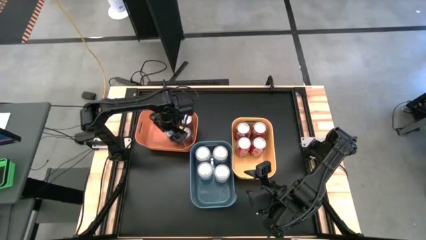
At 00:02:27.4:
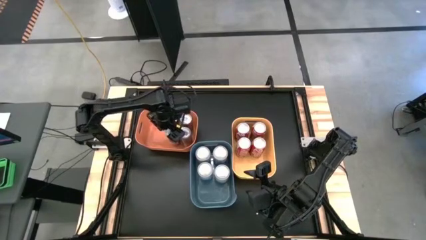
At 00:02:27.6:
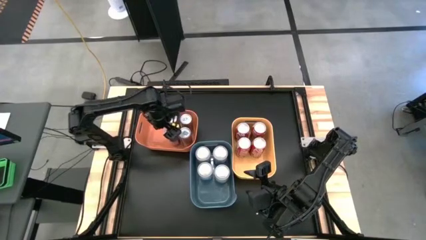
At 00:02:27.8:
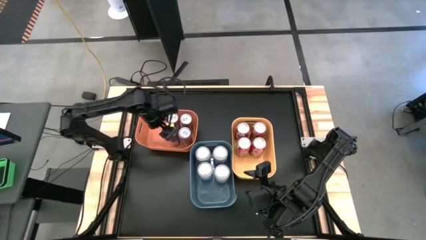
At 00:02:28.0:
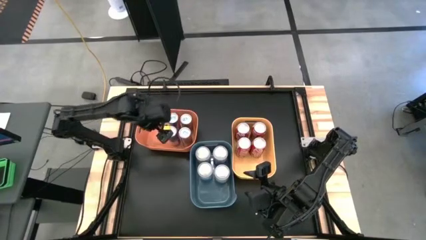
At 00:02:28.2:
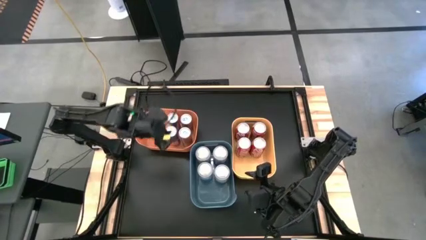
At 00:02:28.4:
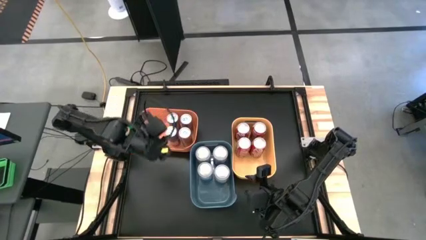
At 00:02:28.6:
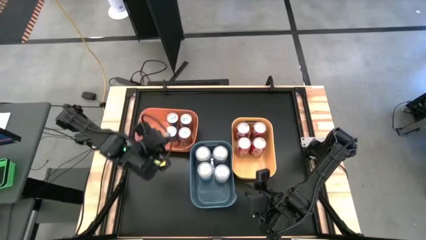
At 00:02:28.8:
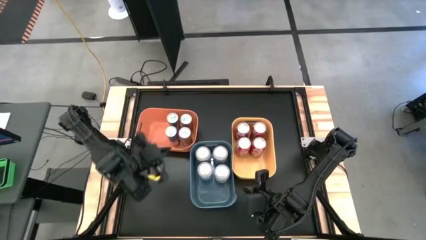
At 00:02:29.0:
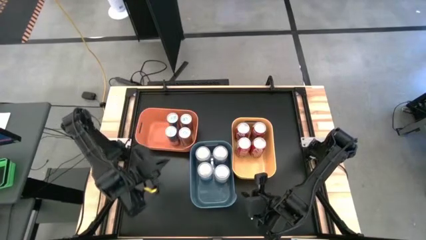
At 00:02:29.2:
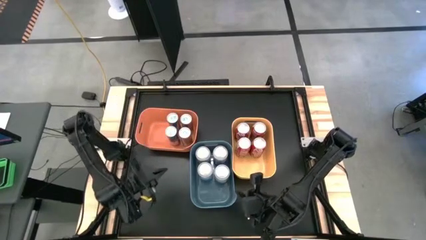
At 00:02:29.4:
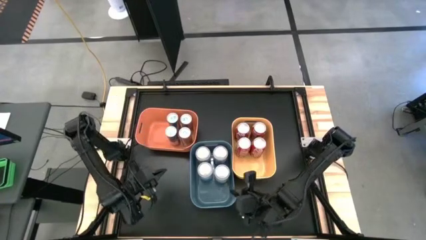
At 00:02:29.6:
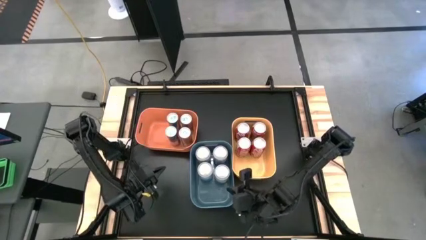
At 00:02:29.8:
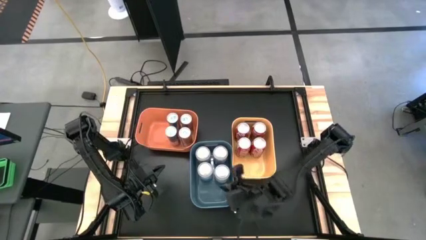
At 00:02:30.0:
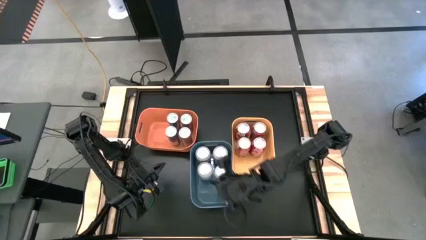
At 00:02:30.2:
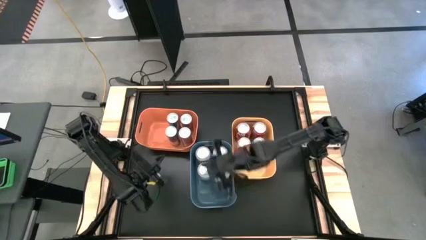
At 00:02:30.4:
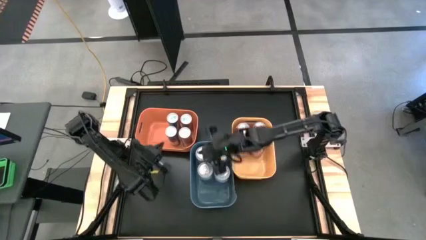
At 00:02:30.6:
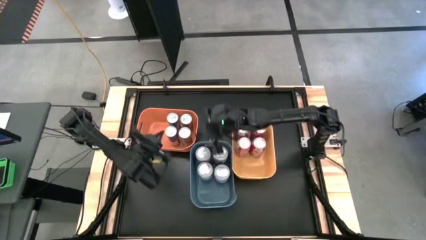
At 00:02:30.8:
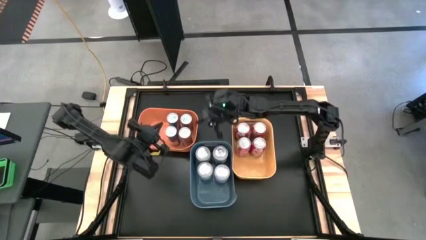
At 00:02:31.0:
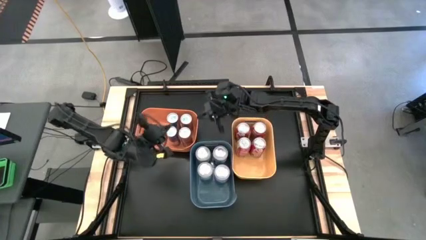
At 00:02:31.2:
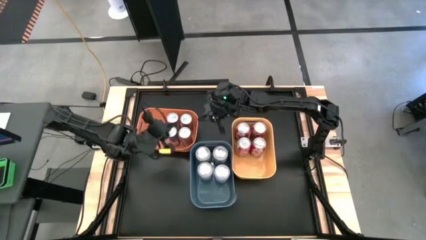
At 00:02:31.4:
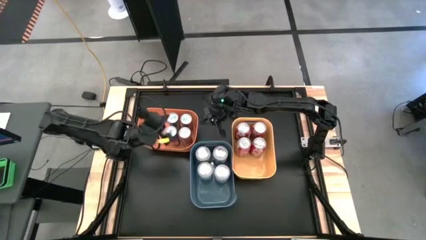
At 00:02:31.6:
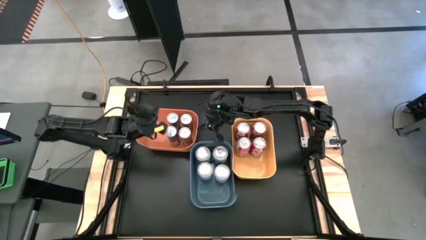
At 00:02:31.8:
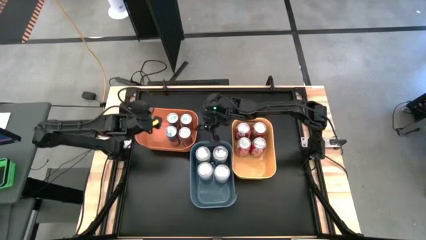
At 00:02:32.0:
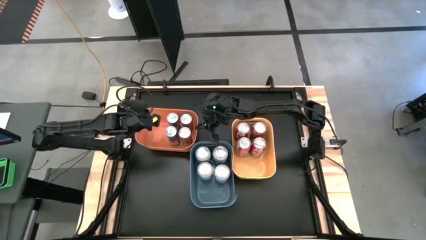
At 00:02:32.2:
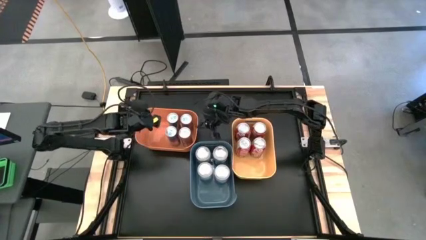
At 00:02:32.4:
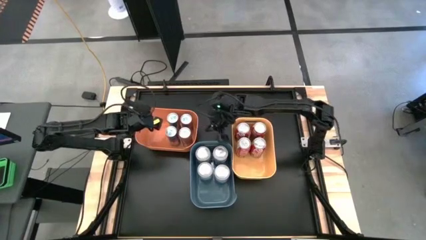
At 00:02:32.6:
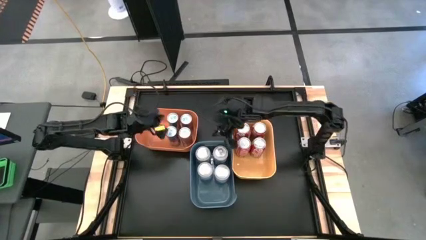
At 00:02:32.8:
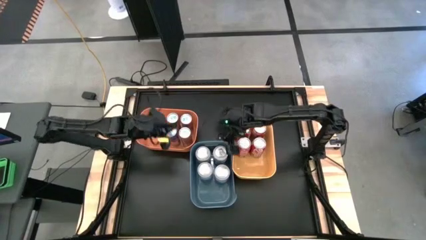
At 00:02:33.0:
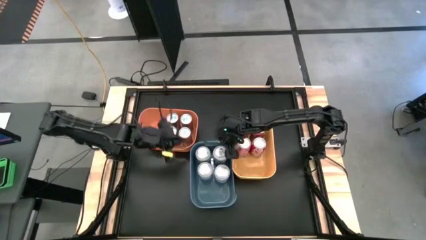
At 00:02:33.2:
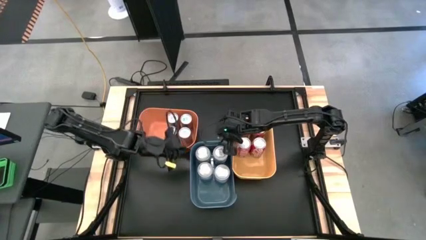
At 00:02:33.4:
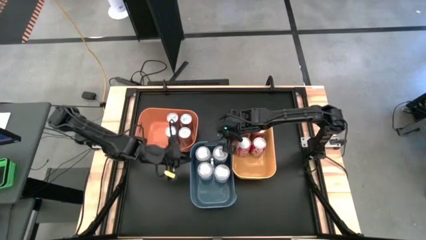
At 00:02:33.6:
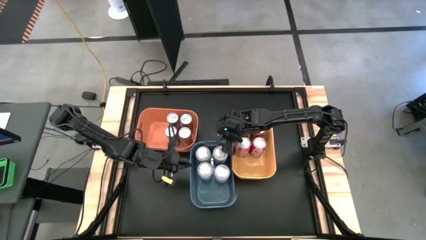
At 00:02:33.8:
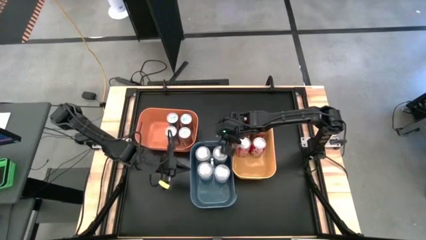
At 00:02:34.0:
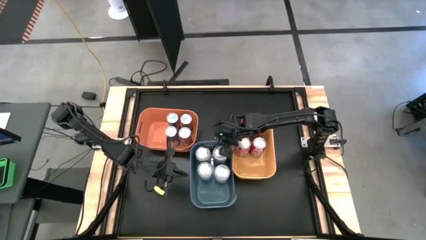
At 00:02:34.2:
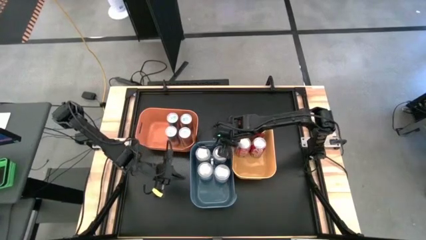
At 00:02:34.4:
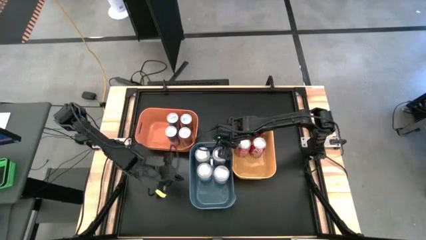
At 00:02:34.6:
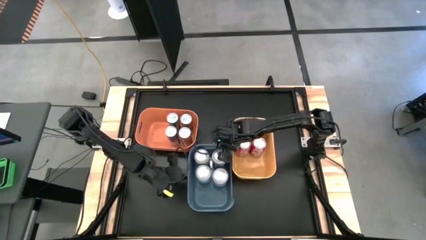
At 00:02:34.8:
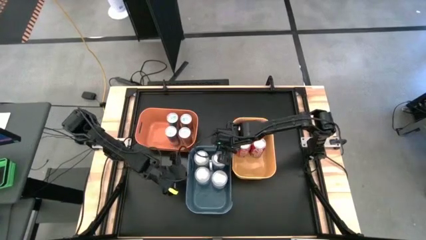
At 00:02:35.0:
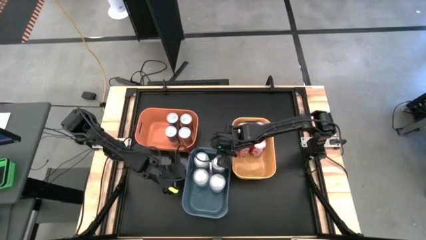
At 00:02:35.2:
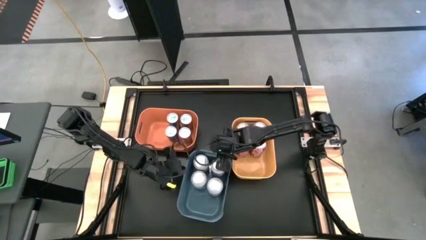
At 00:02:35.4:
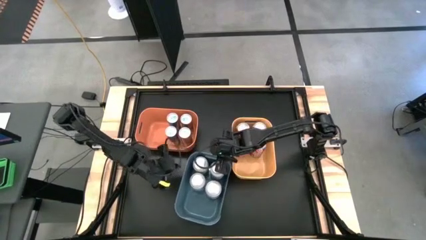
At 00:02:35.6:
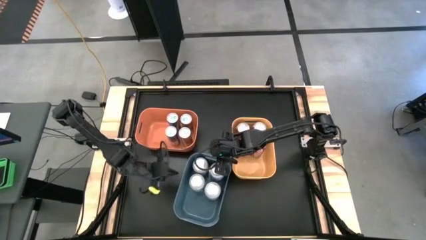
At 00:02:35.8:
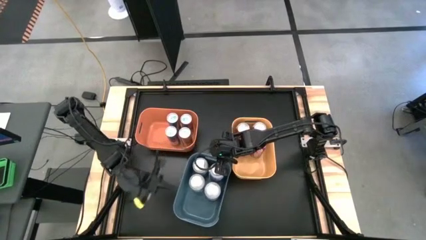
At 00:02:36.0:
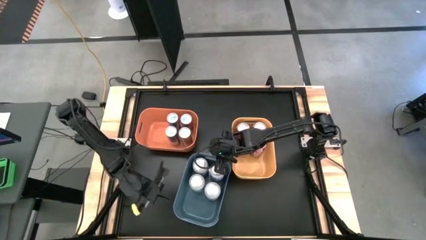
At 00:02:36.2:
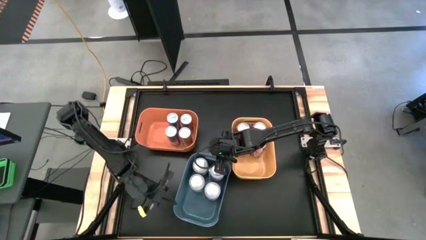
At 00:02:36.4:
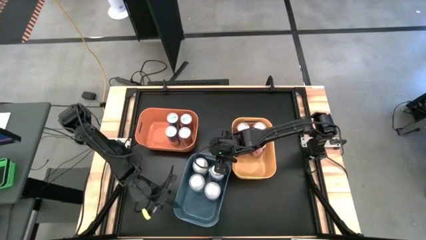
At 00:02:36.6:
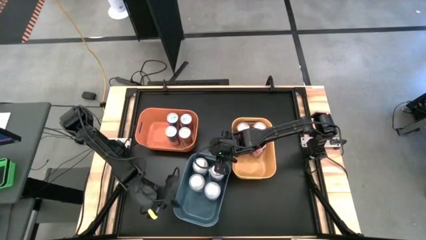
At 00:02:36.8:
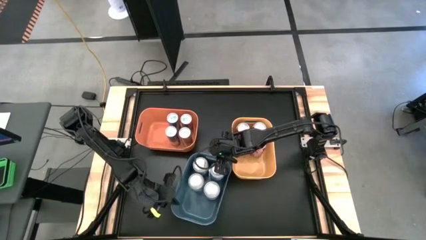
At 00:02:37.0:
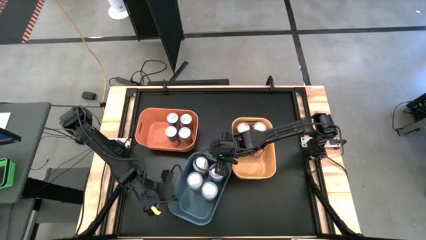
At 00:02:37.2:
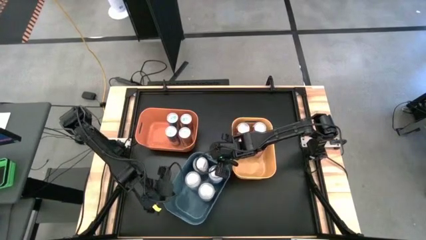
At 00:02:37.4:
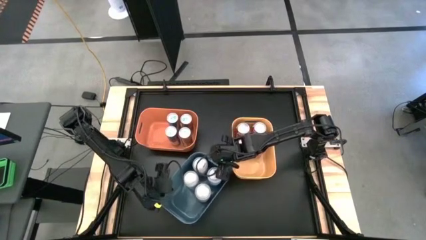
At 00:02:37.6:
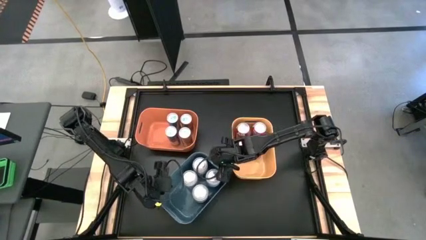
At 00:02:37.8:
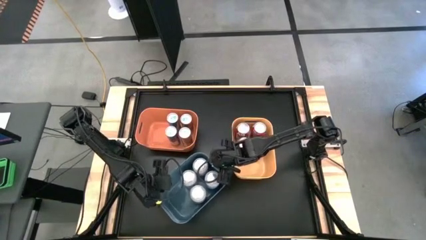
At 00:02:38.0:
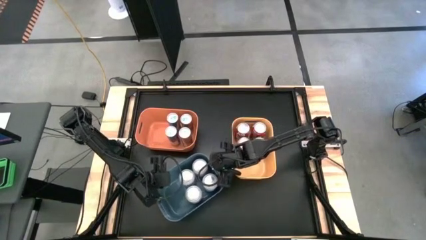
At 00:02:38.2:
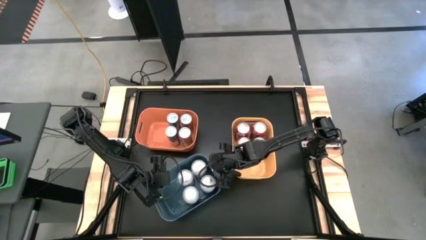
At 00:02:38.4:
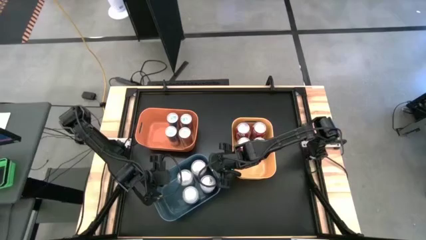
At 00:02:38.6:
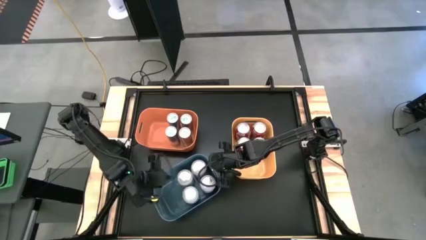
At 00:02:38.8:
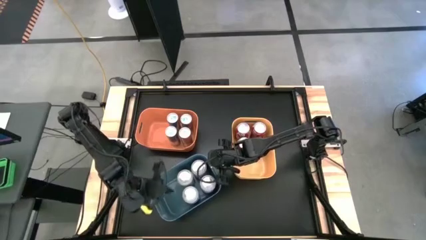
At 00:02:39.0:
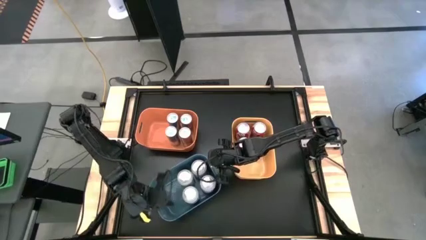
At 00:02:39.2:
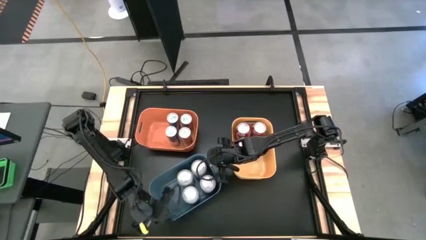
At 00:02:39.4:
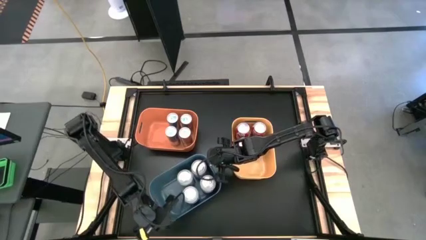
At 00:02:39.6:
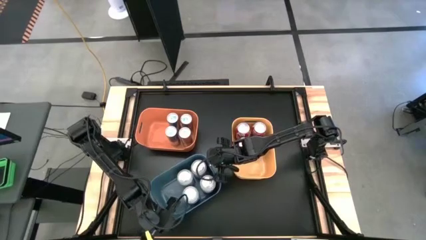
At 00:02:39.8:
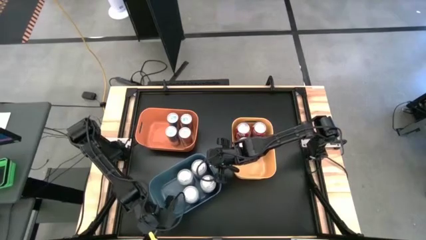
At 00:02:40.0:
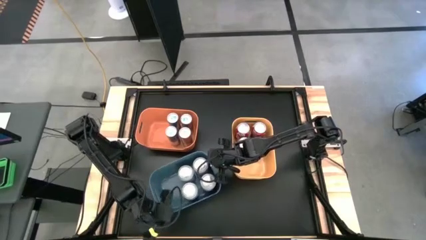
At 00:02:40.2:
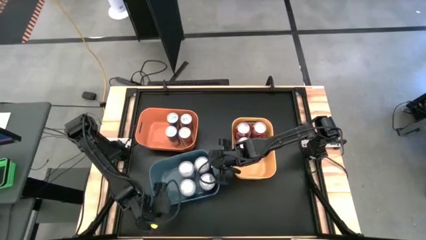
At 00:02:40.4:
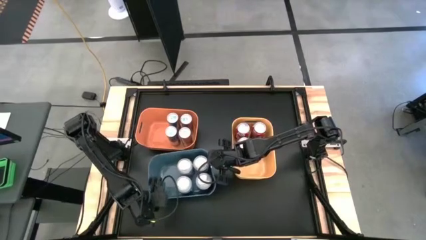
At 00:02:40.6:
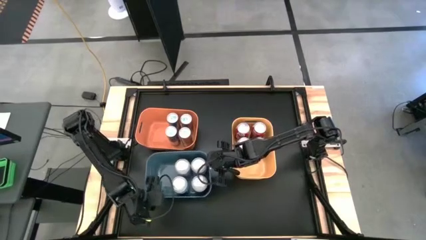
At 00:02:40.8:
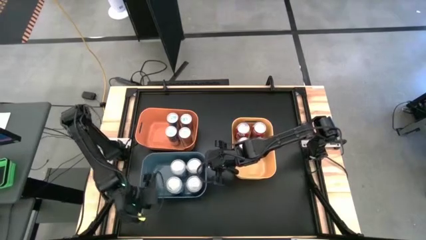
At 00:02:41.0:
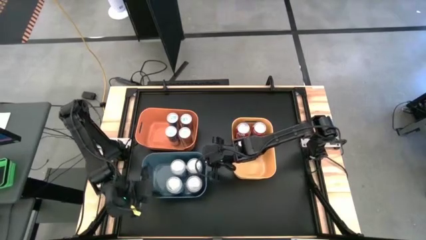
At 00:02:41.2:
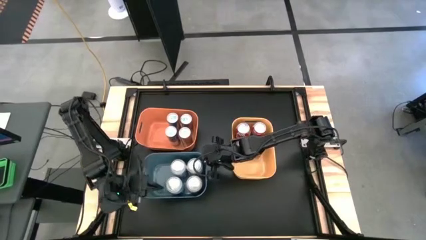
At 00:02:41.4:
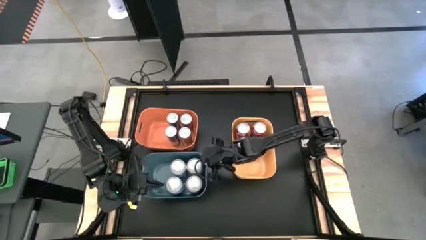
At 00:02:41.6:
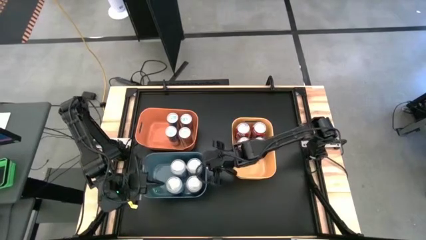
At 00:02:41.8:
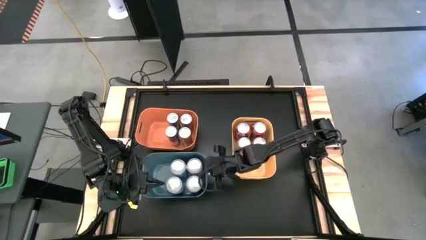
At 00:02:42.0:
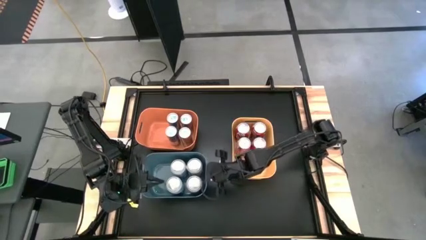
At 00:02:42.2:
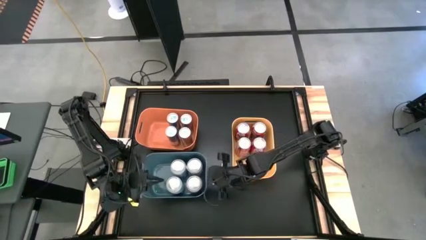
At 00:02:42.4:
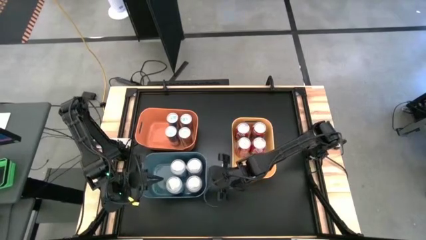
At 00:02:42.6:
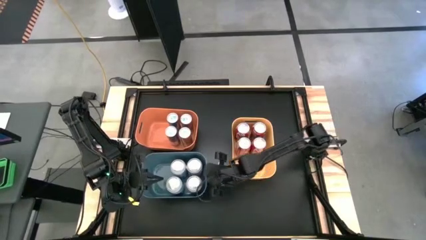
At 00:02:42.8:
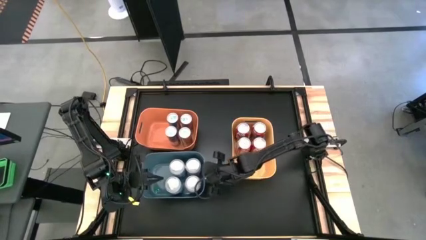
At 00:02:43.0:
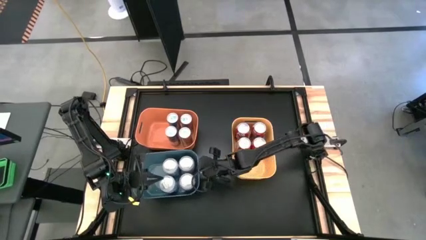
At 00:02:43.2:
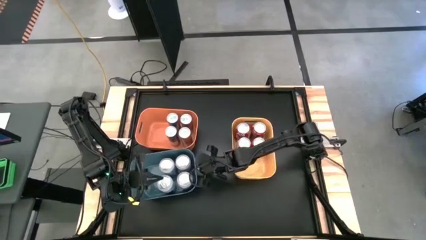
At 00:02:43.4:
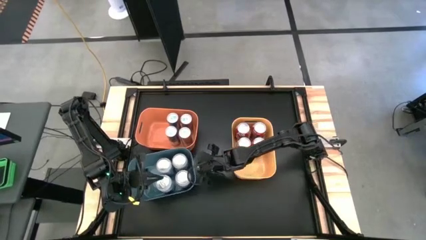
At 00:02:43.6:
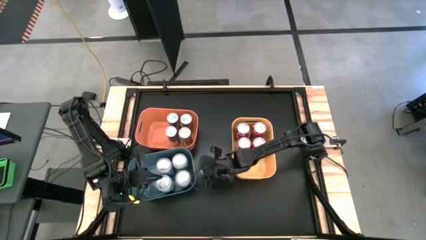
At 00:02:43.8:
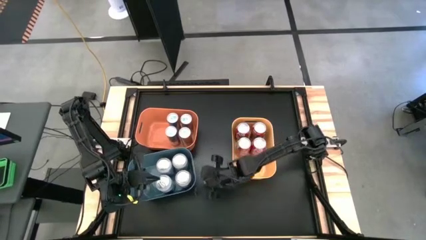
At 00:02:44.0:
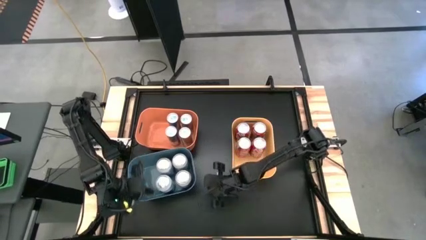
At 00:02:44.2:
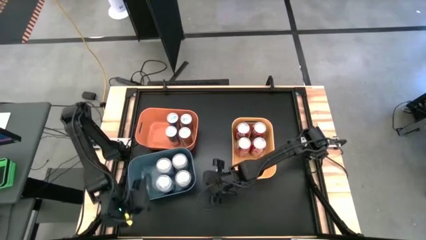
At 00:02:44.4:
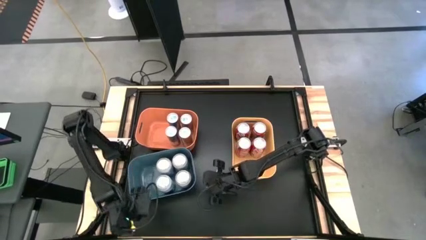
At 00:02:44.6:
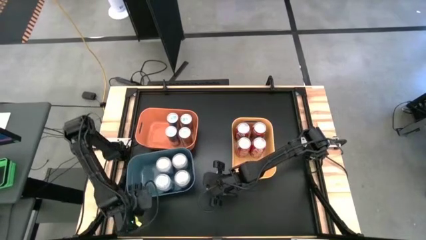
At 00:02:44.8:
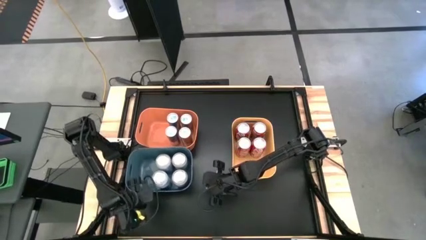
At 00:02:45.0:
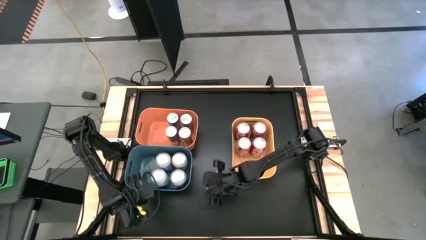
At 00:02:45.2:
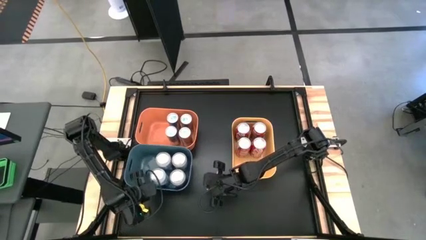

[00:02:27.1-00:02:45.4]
Task: Sort soda cans
Move the blue bin to the middle left of the table
